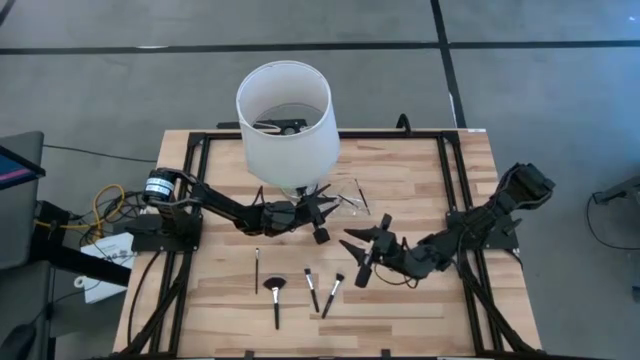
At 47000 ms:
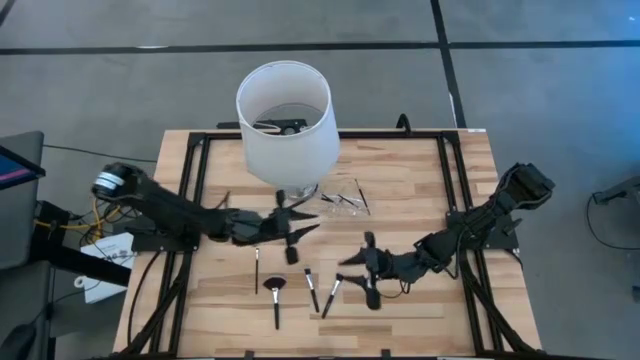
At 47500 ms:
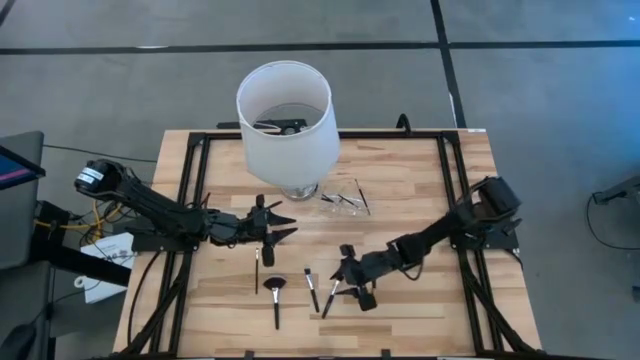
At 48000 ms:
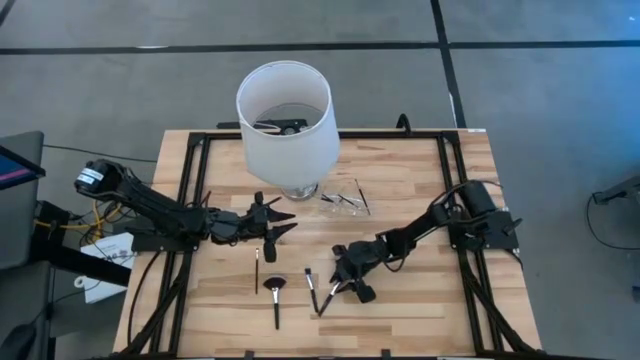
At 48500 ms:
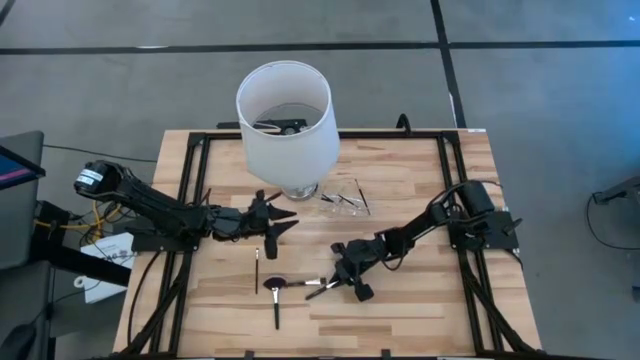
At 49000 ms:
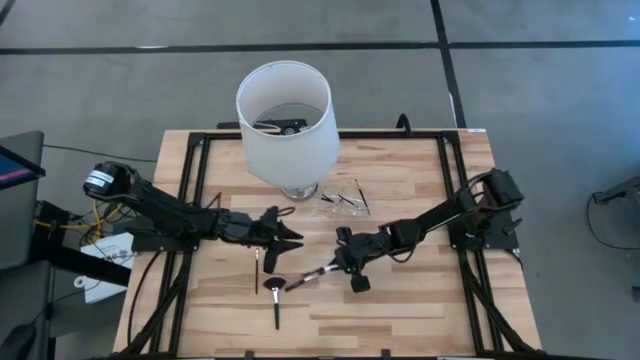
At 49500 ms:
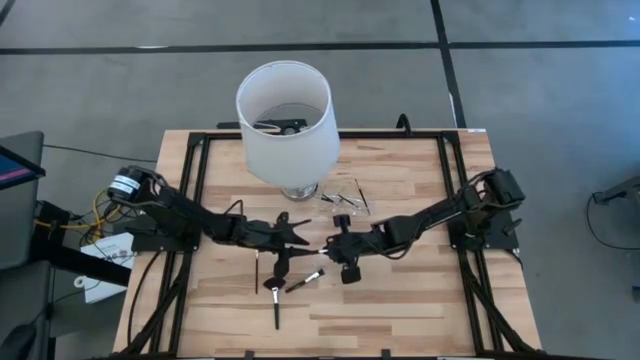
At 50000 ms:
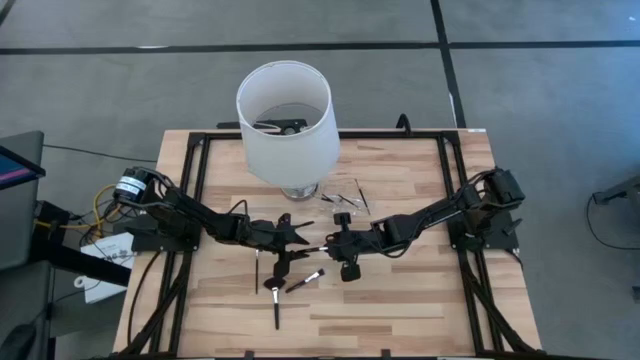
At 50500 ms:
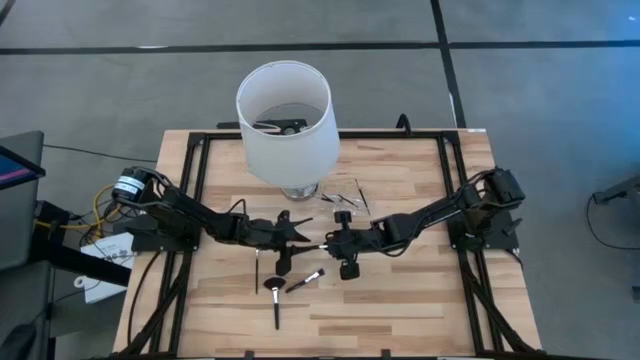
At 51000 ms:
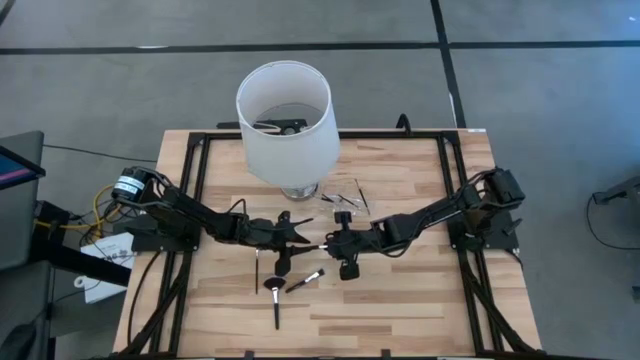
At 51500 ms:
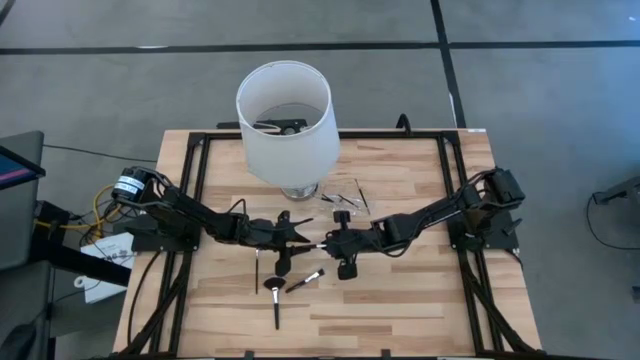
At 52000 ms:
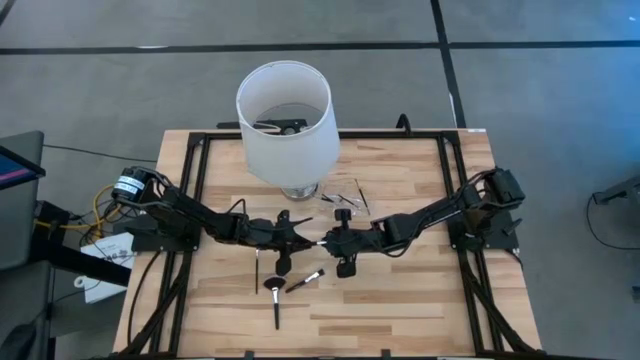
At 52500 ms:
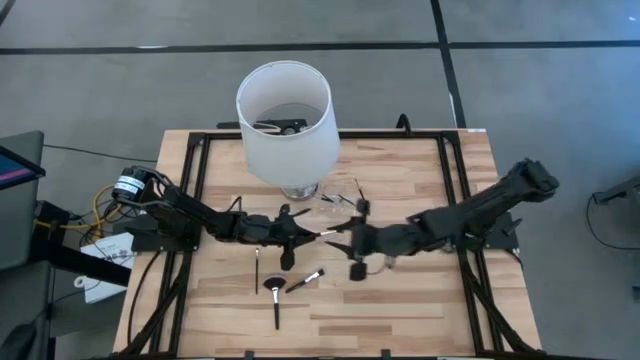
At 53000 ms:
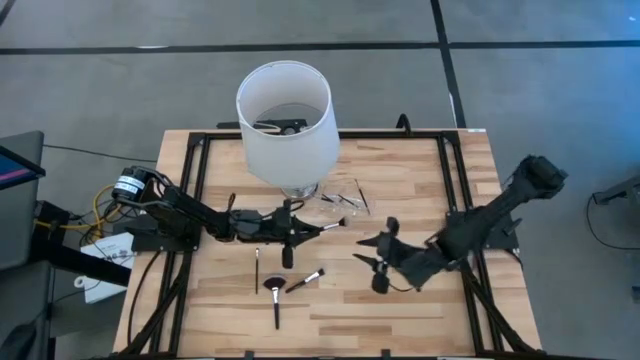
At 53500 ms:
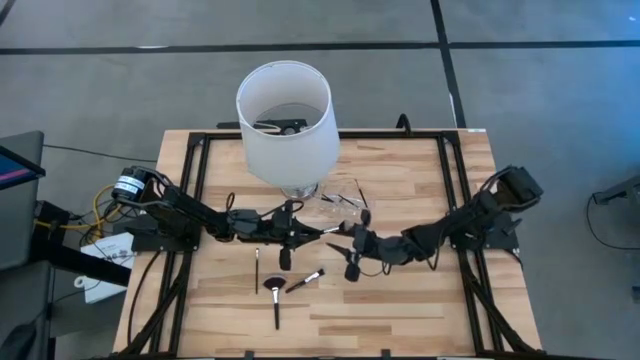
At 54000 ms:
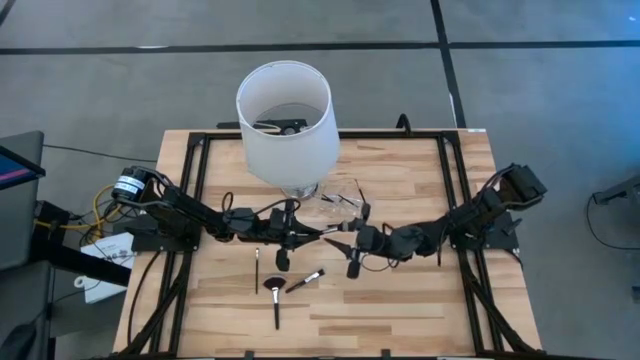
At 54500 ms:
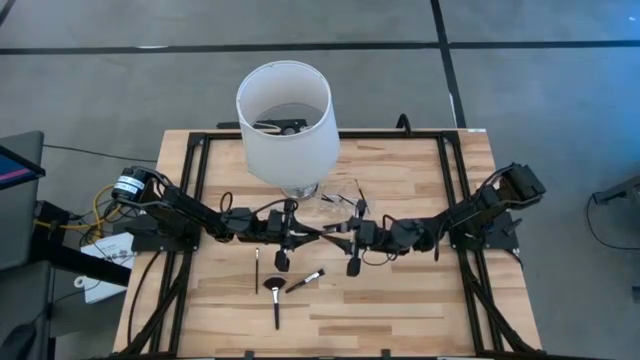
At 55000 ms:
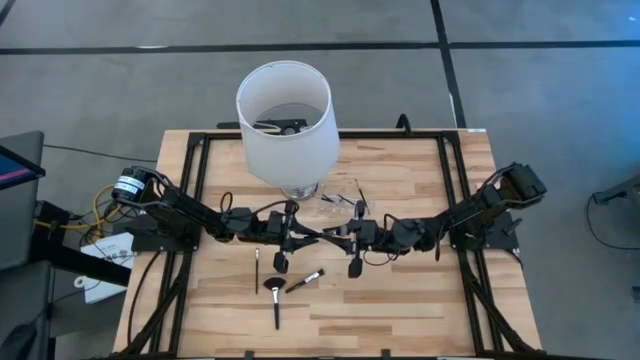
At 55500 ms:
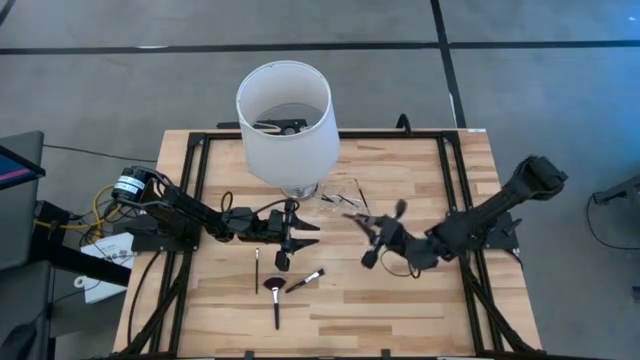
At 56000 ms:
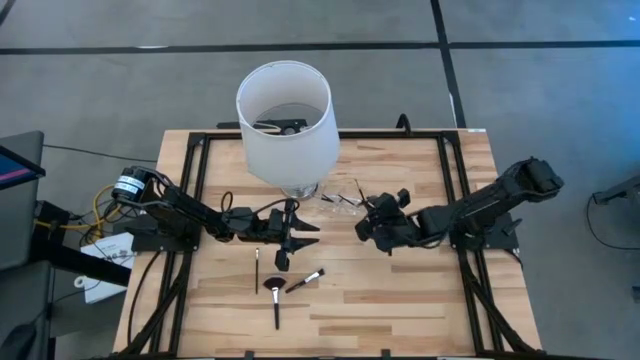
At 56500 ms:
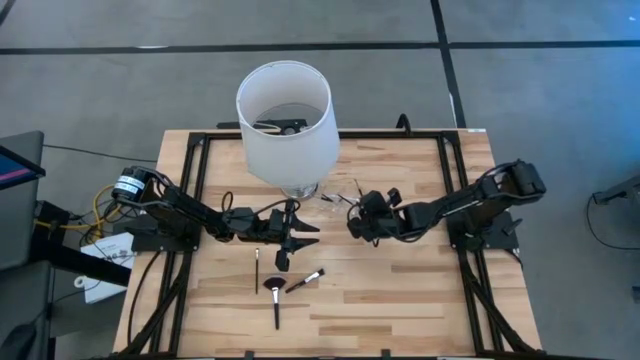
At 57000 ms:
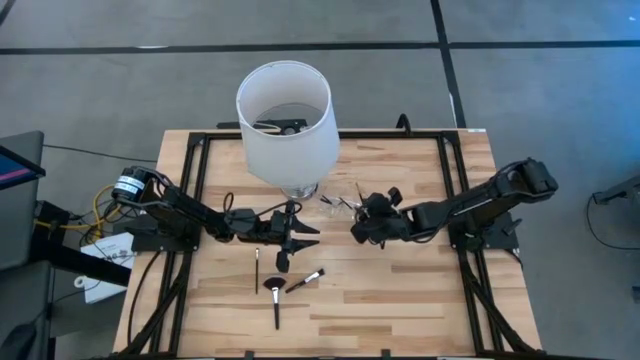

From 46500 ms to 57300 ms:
Task: Put items in baskets/containers
Put the powder brush into the transparent organizer

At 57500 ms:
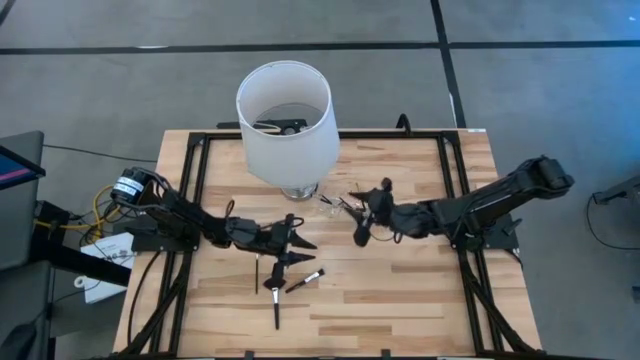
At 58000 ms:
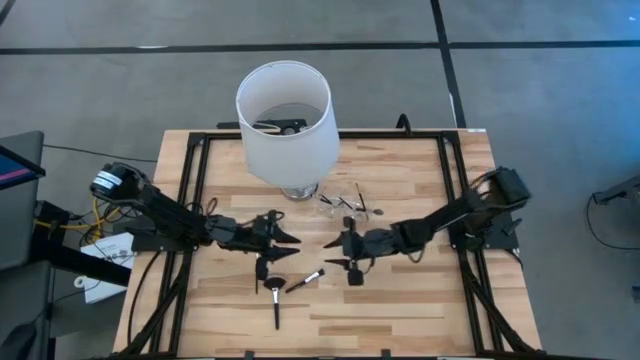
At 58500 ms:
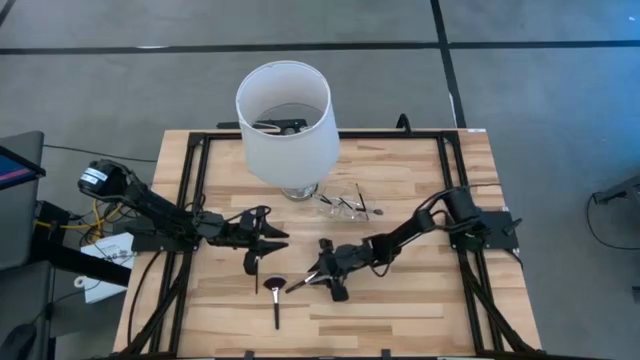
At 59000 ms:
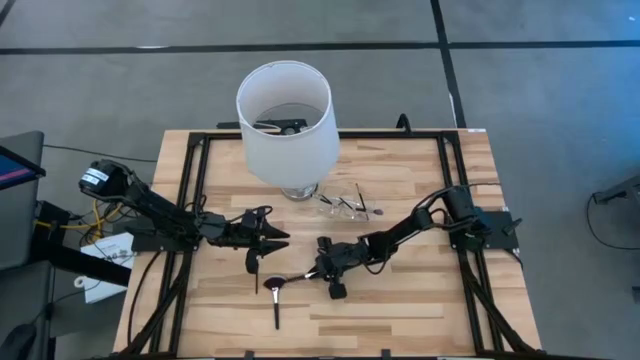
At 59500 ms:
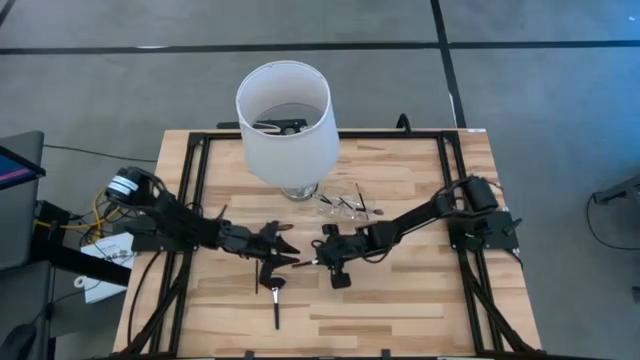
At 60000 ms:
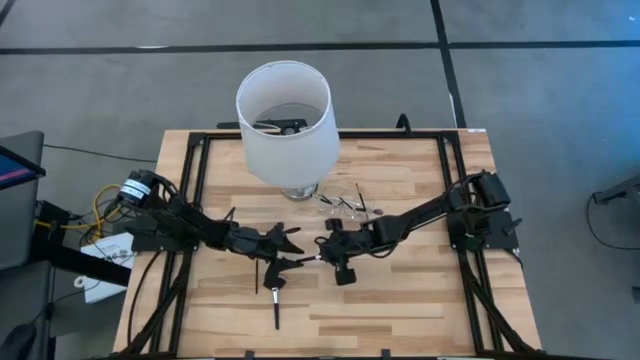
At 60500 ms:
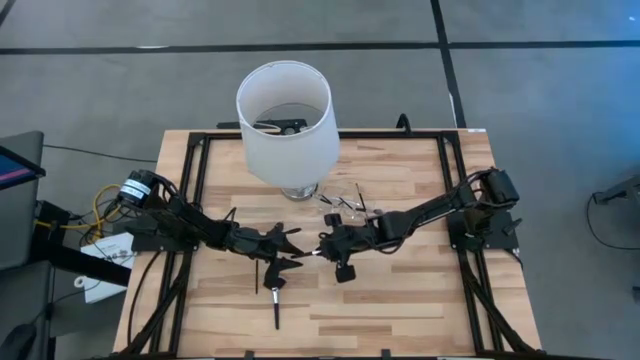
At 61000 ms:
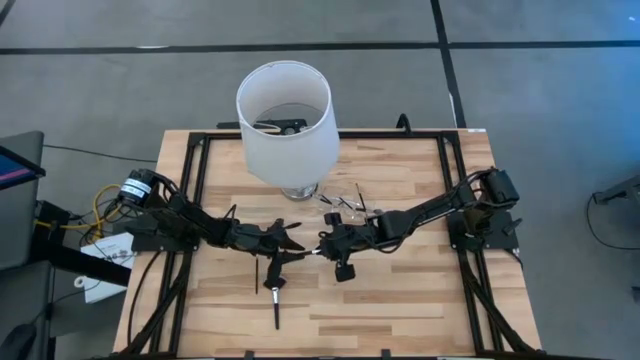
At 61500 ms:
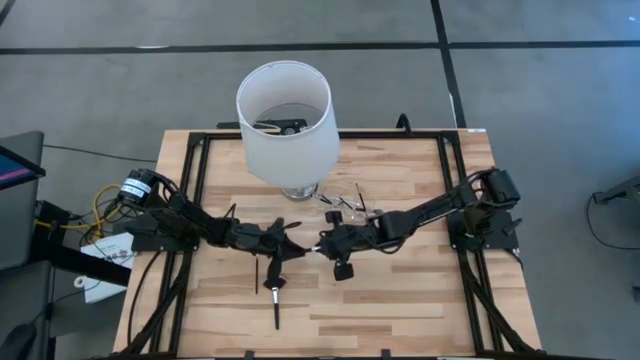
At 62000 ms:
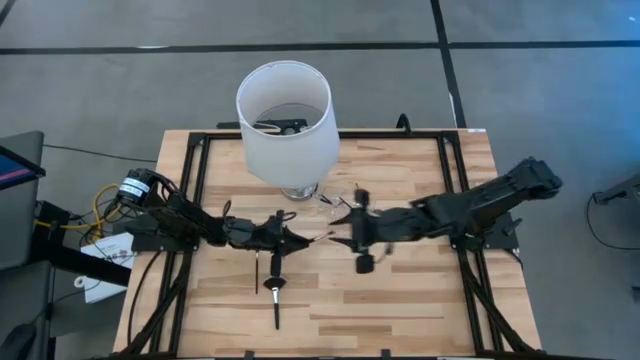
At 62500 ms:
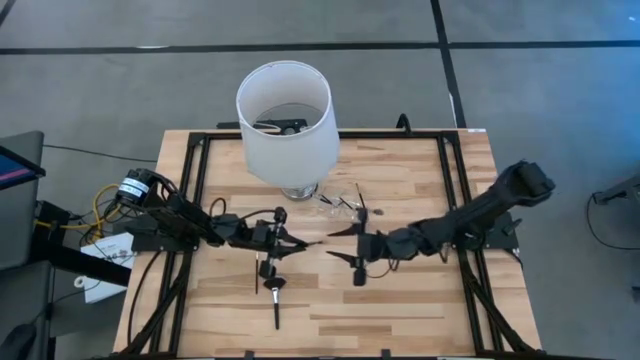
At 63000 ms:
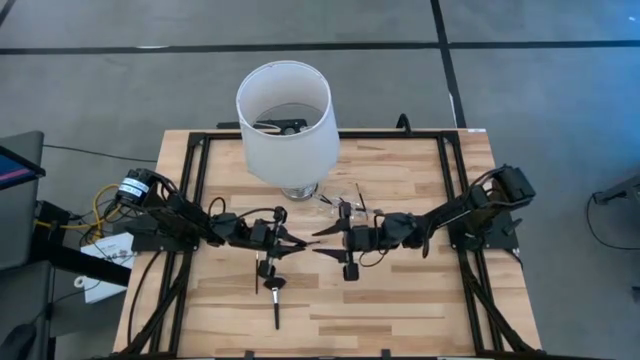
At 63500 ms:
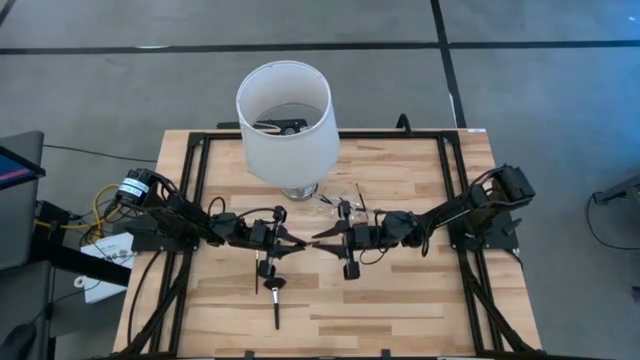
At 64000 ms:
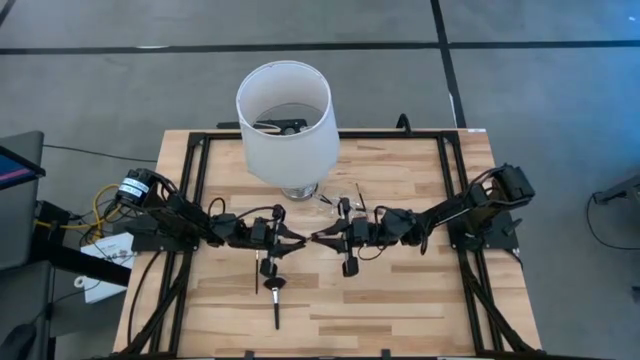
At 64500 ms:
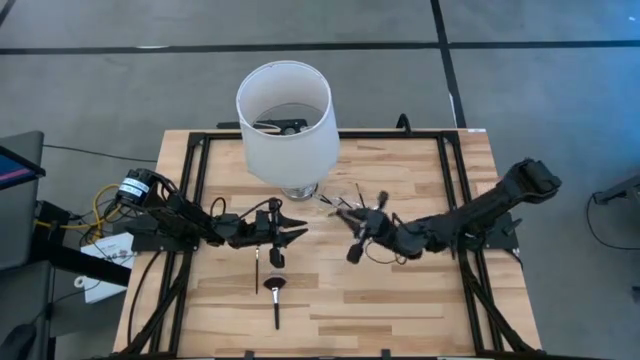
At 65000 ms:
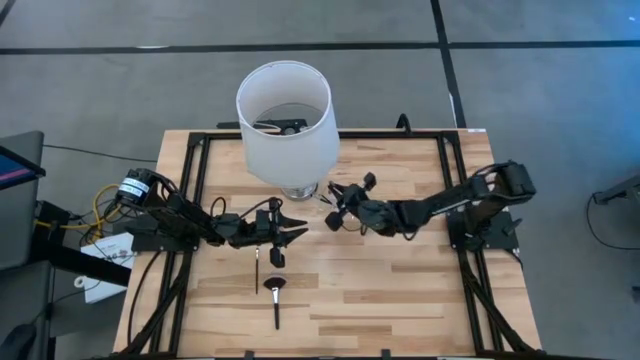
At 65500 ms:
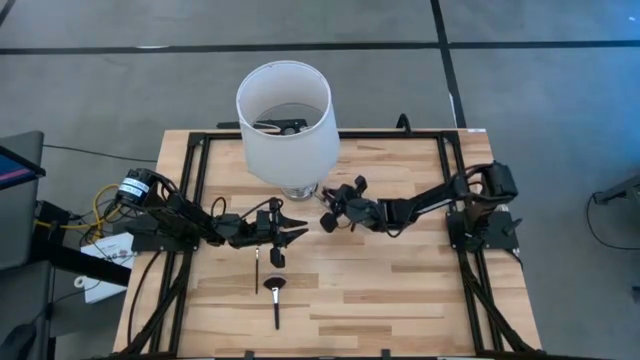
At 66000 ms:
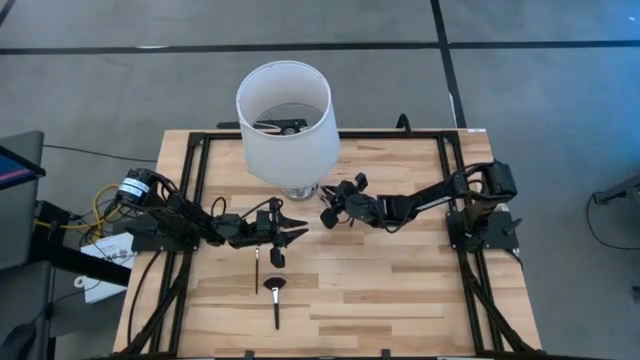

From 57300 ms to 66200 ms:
Put the blush brush into the transparent organizer

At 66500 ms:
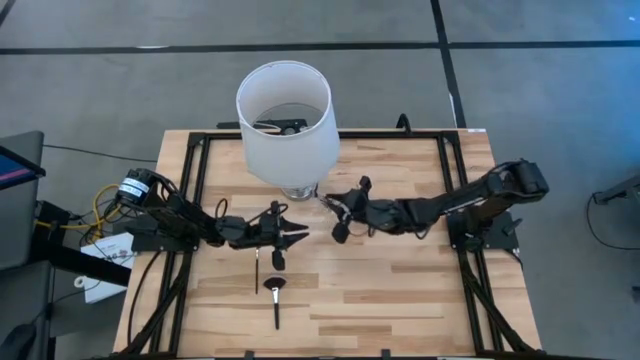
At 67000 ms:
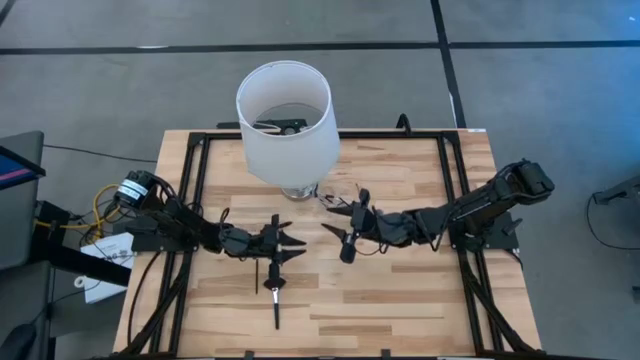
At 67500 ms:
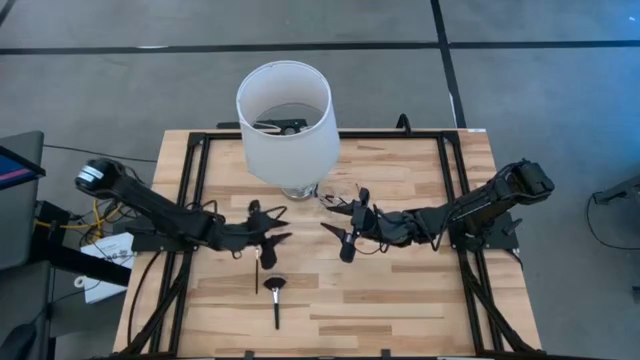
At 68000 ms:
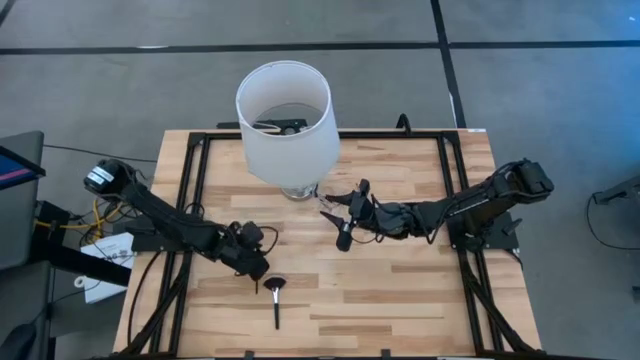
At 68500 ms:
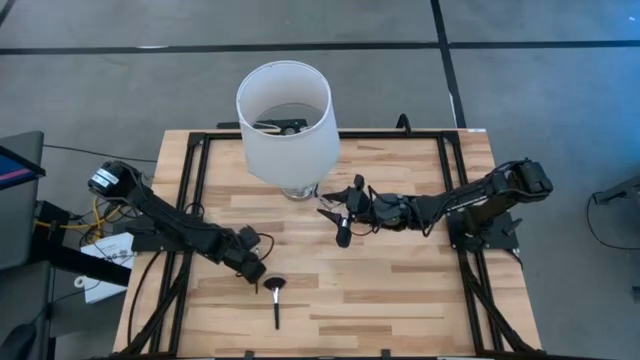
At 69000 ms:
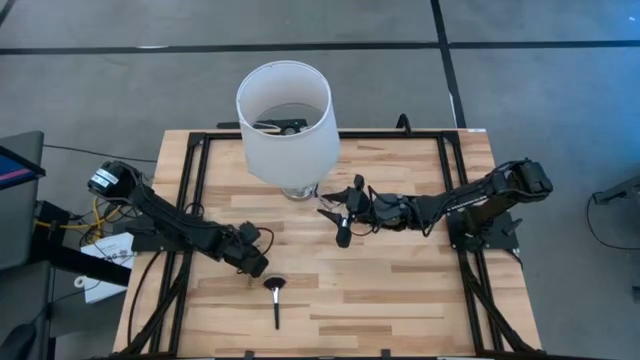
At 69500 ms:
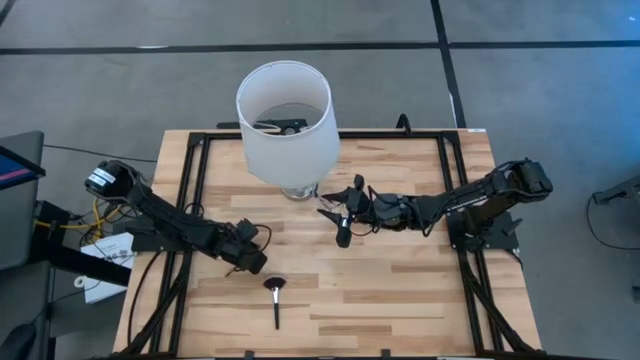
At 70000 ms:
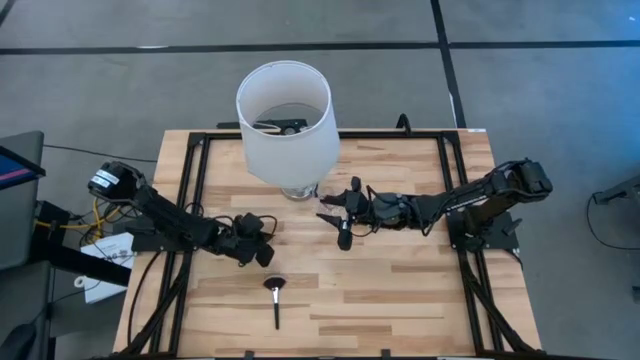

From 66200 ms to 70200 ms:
Put the black eyeshadow brush into the transparent organizer
